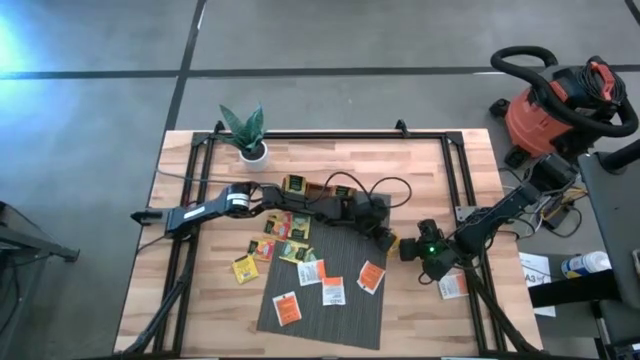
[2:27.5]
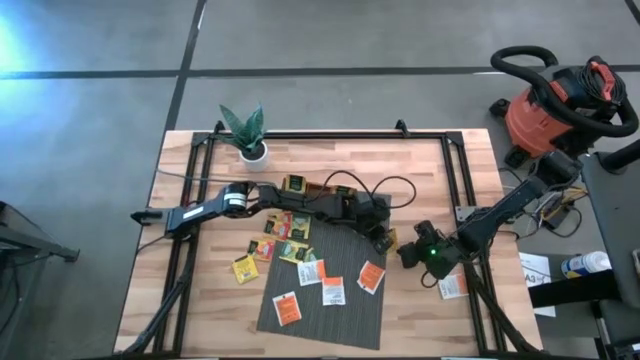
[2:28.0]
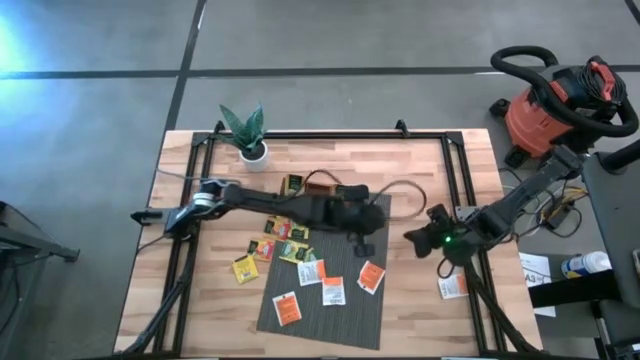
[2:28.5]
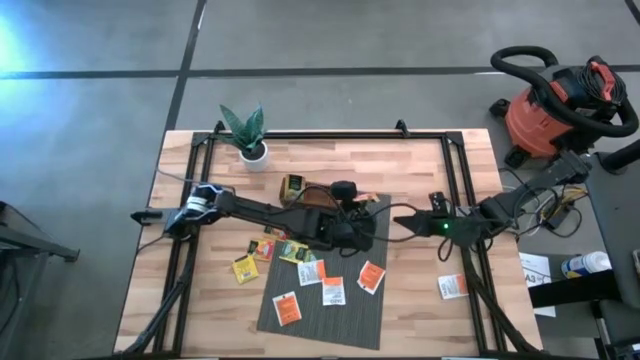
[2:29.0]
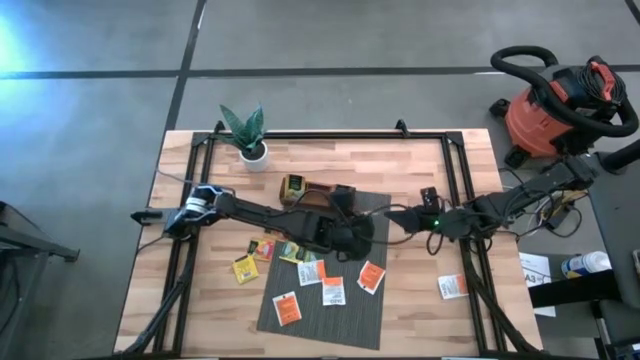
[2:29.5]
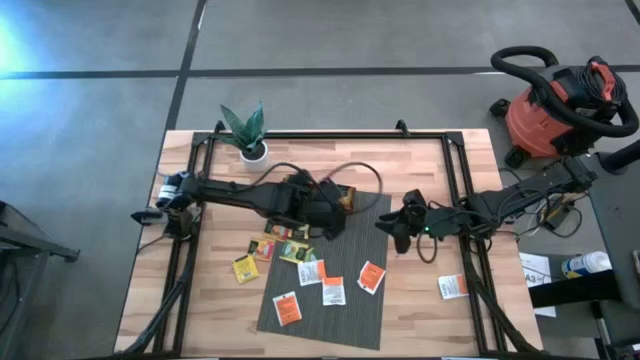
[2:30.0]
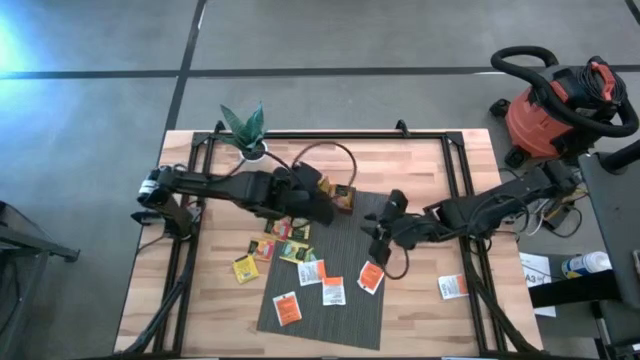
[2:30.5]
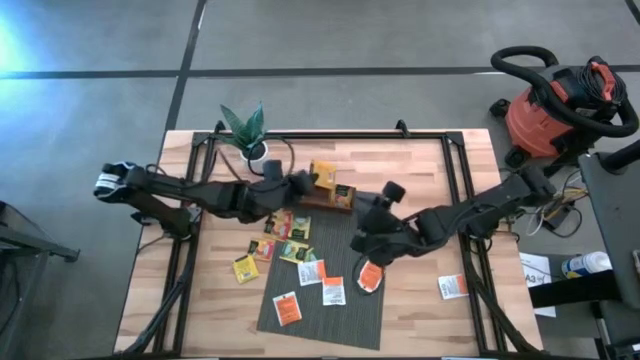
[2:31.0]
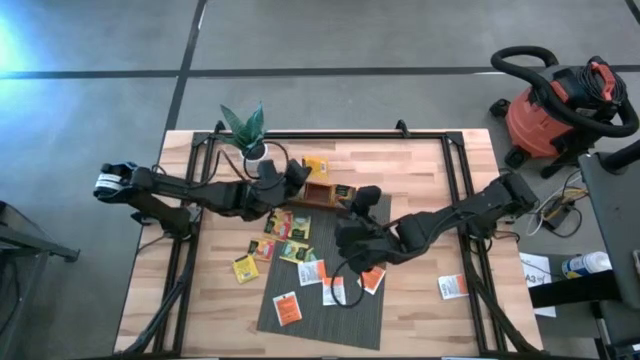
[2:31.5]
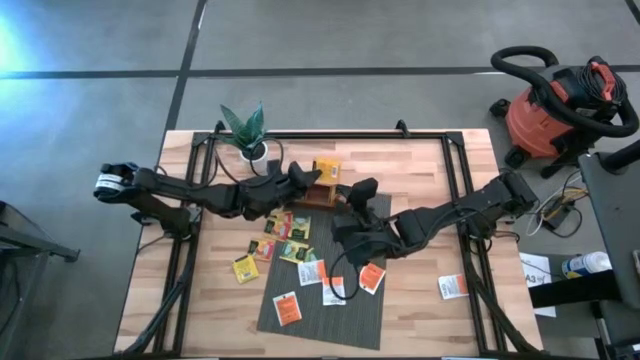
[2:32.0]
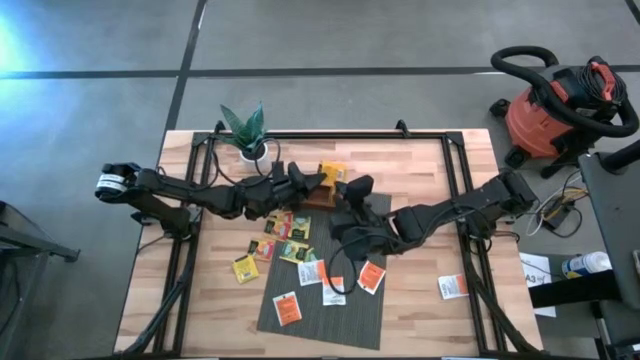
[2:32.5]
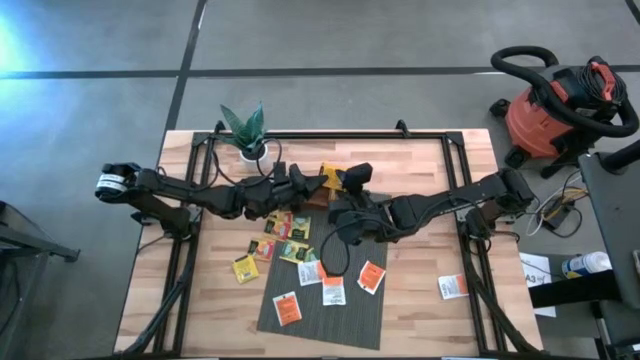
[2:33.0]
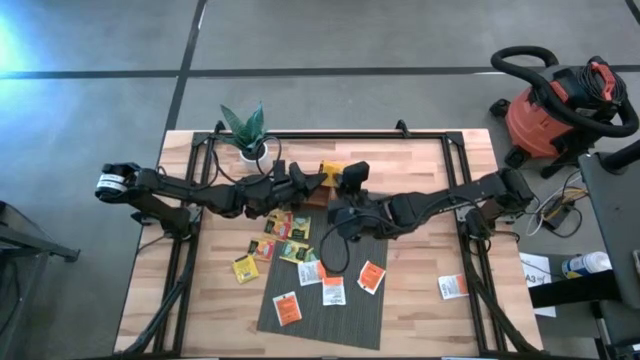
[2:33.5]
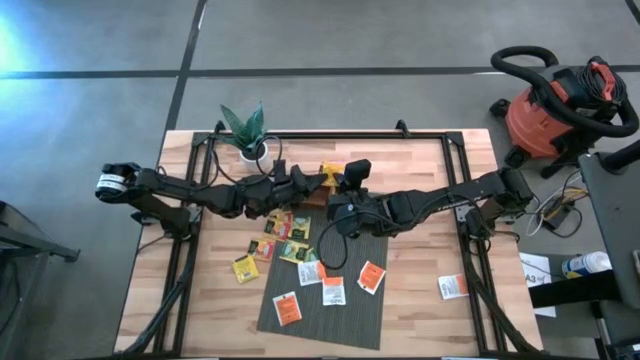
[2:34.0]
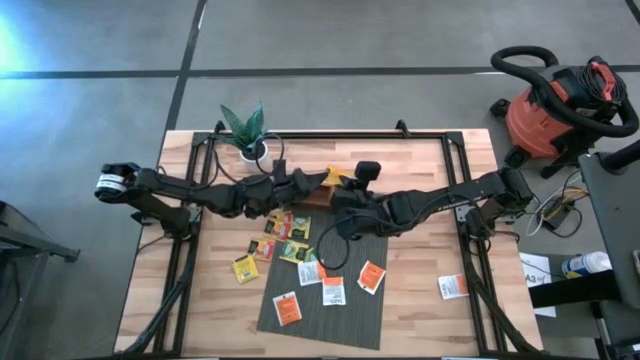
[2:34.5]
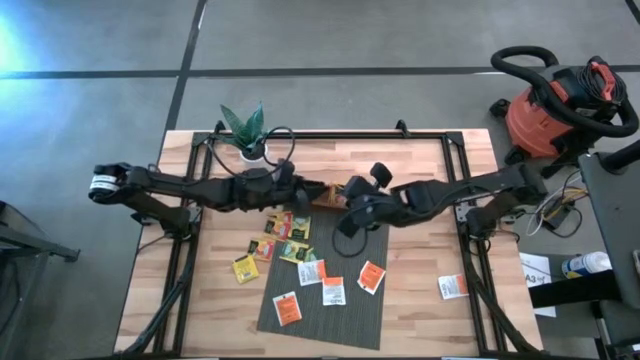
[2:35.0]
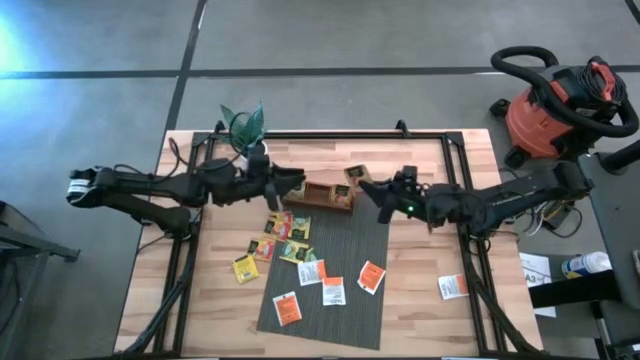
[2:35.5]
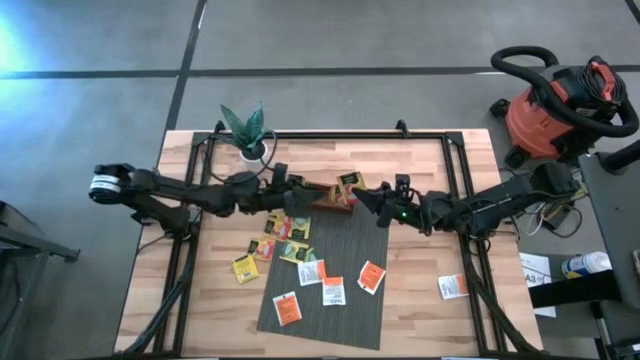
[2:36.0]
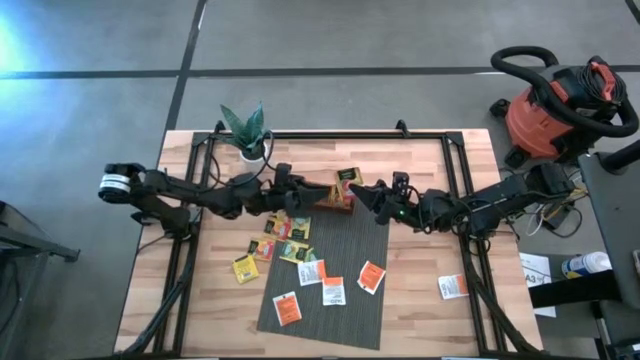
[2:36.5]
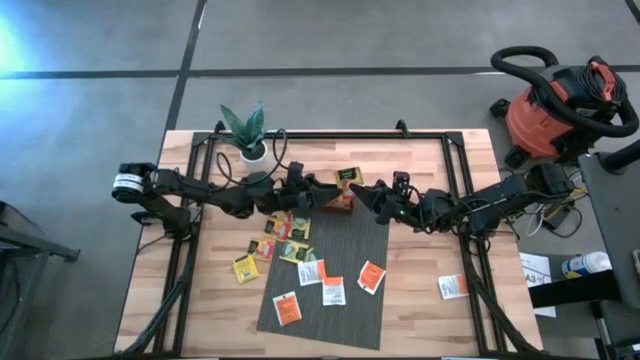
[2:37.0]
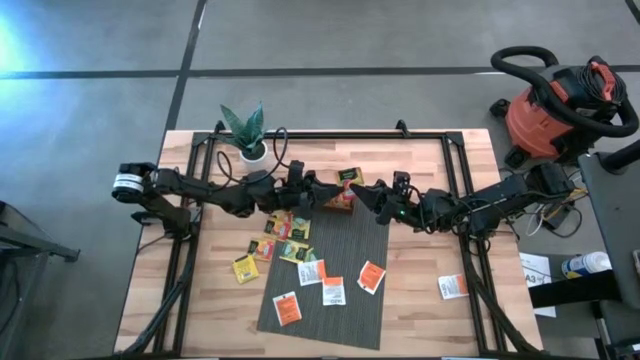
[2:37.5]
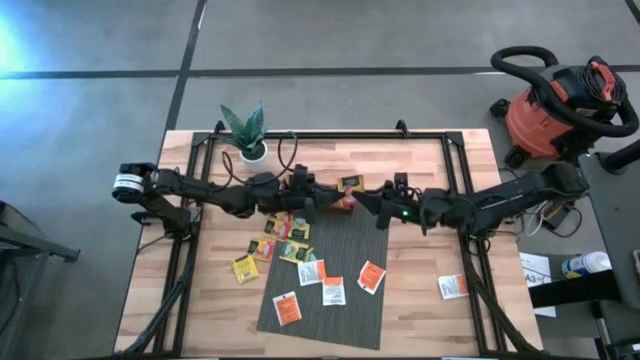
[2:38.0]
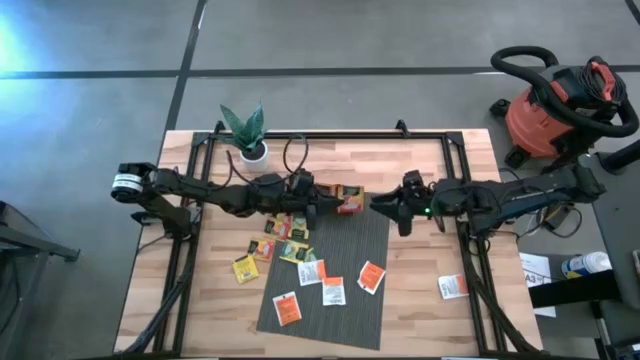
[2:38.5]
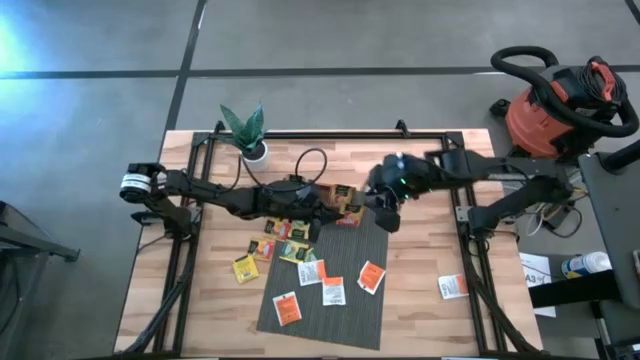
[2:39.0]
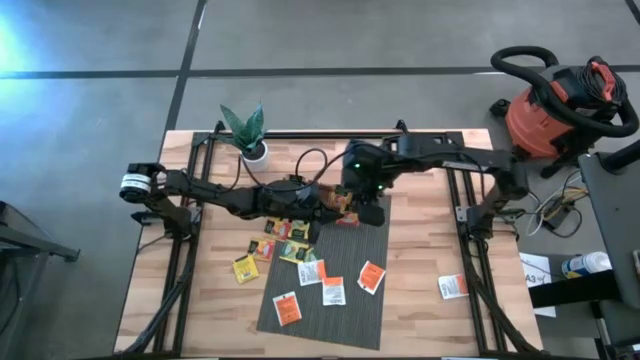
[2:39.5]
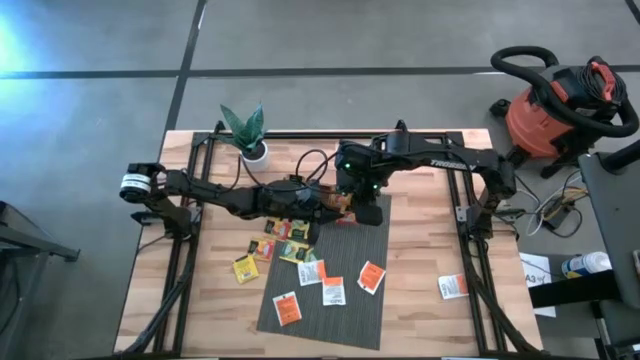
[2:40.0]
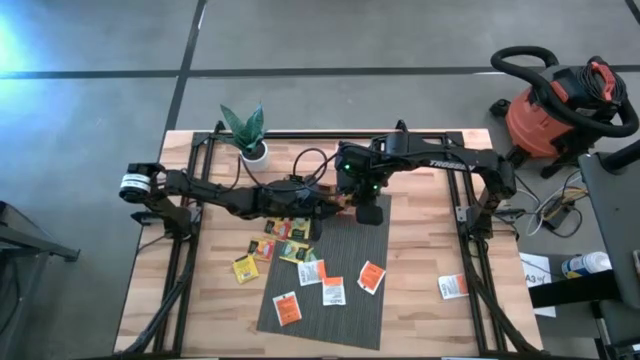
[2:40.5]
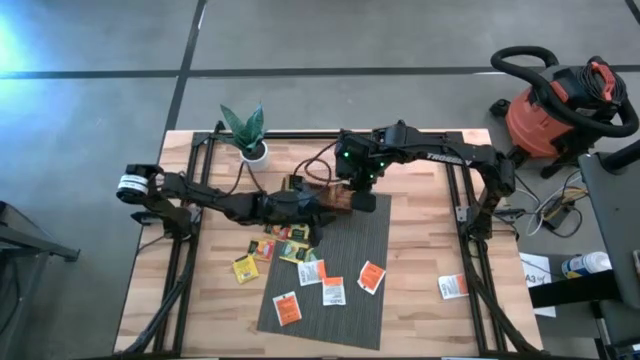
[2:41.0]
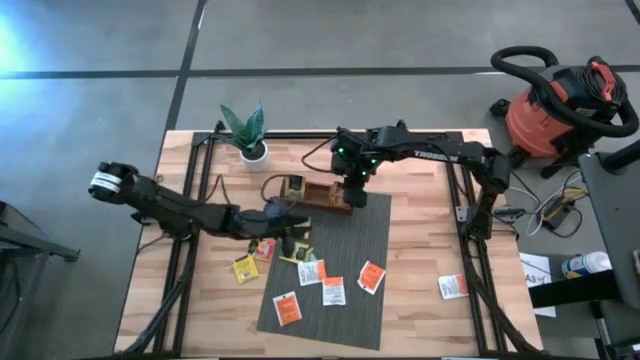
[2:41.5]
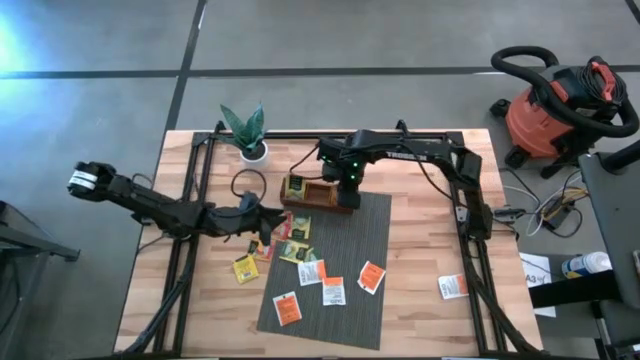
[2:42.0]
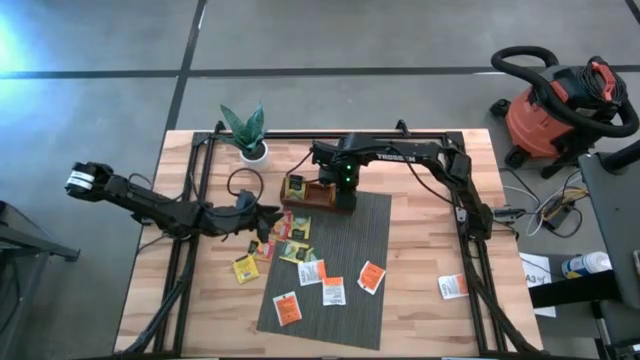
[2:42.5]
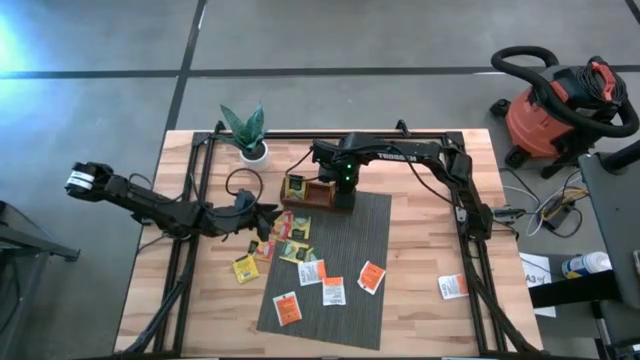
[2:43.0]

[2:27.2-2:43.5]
Task: Pick & Place Tea
Put the orange tea bag into the right compartment of the wooden organizer

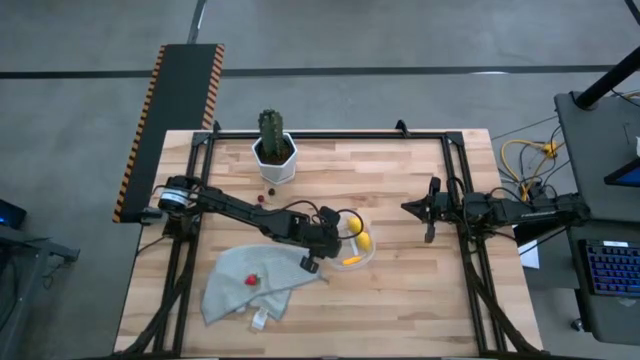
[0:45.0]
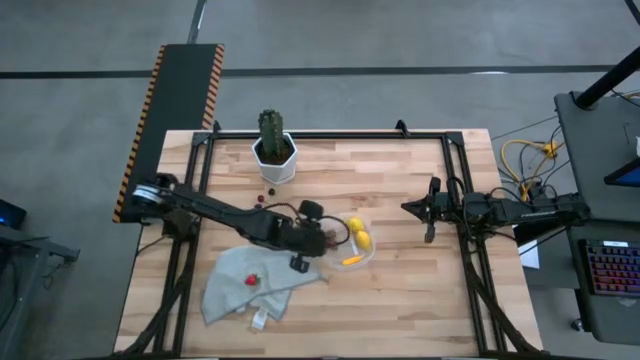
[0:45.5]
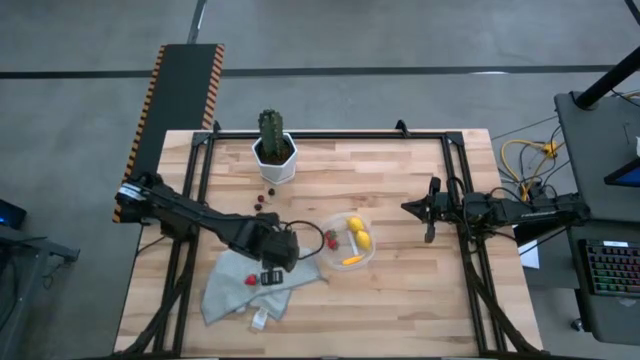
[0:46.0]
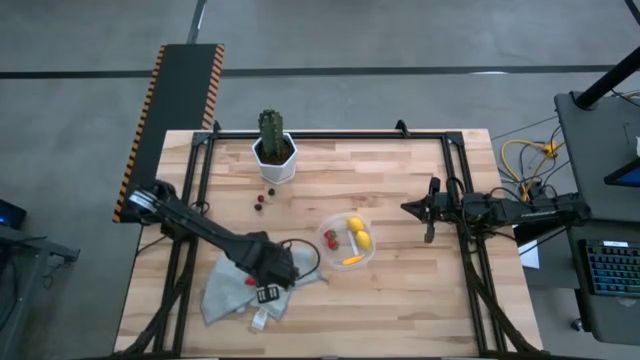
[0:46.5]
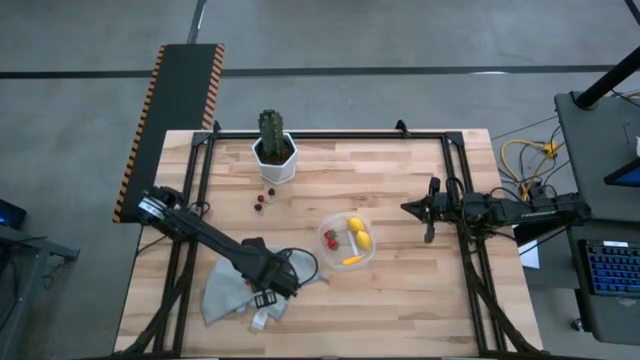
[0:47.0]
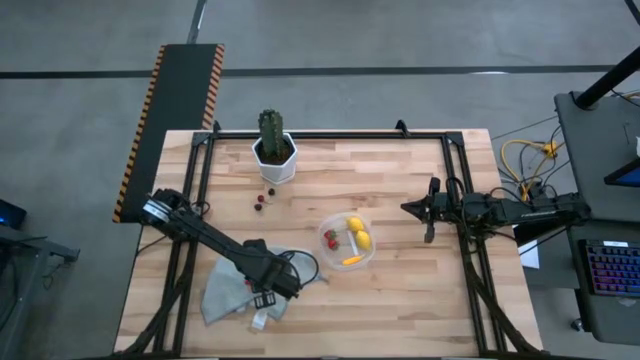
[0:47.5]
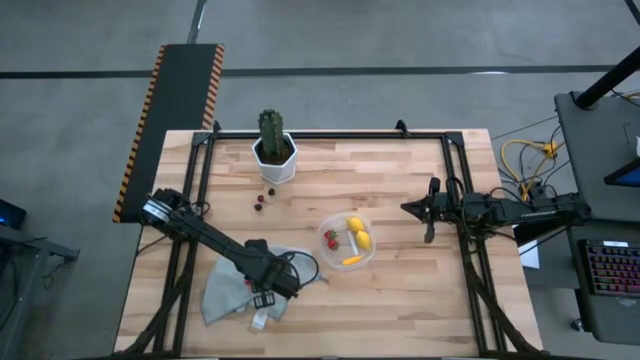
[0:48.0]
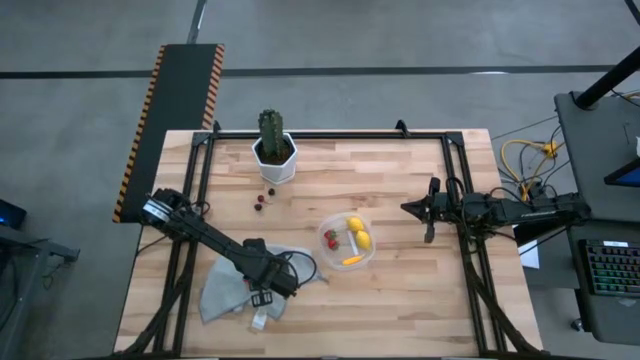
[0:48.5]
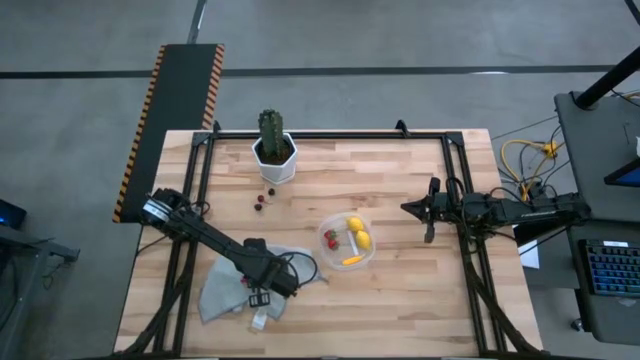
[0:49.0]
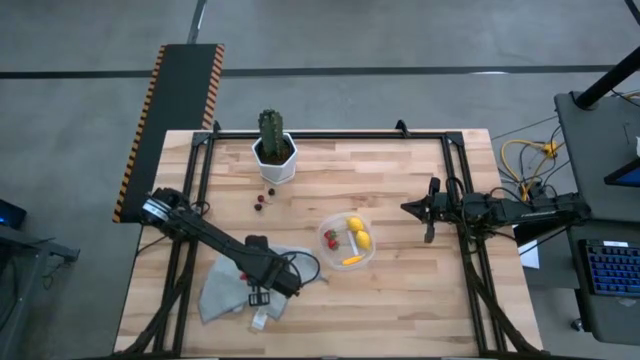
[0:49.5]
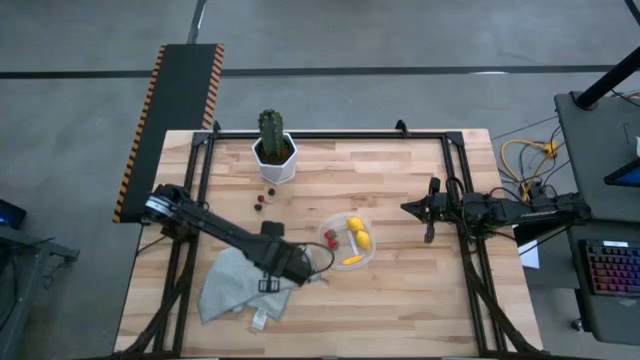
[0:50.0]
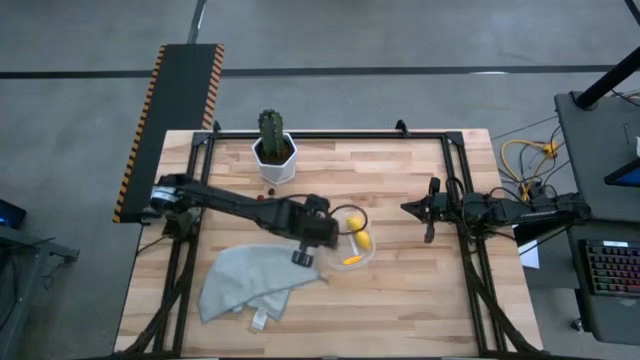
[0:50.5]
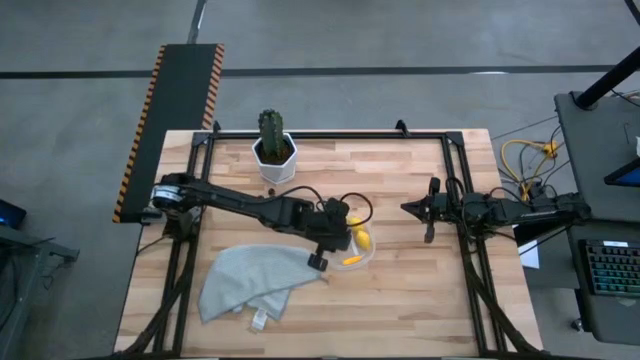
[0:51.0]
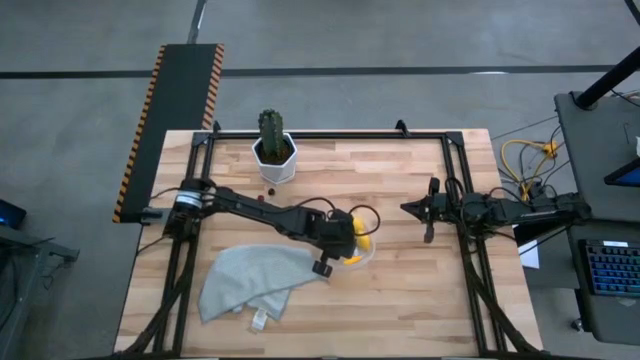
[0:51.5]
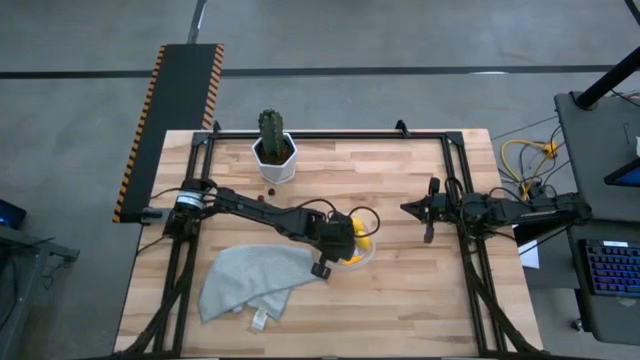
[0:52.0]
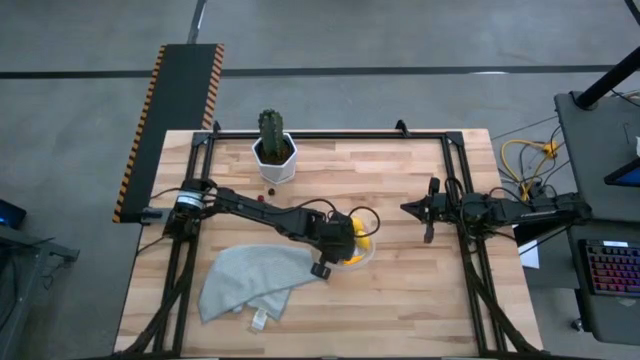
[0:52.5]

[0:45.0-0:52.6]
Task: Pick and placing Produce into tupperware
Put the red strawberry into the transparent container
